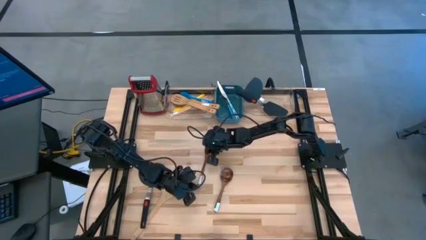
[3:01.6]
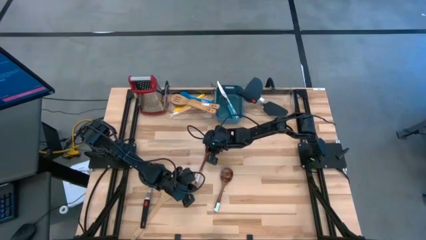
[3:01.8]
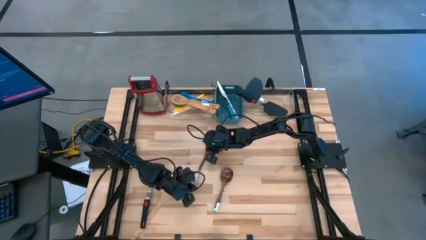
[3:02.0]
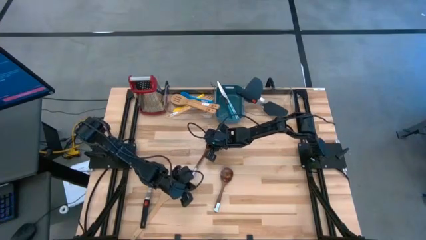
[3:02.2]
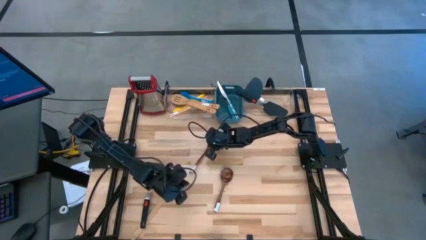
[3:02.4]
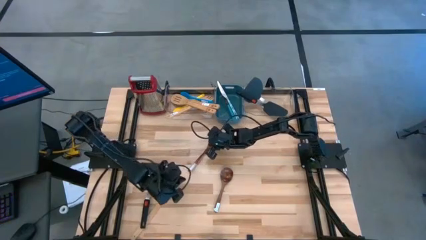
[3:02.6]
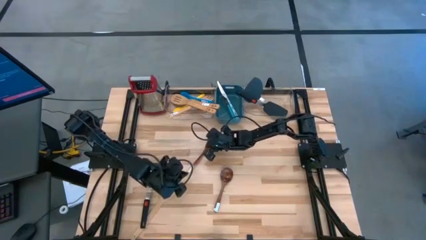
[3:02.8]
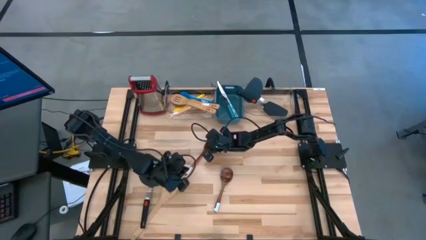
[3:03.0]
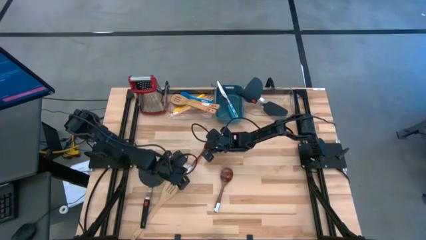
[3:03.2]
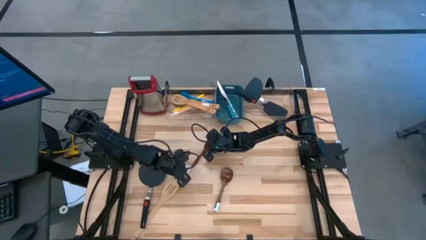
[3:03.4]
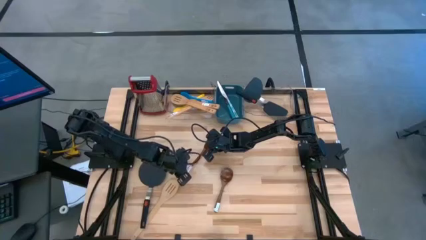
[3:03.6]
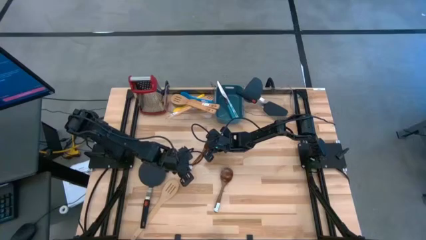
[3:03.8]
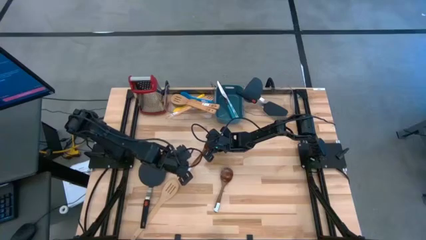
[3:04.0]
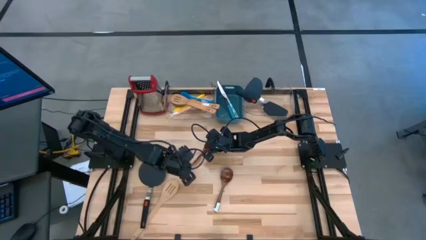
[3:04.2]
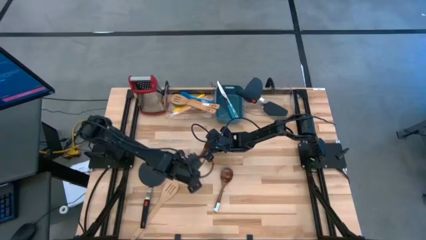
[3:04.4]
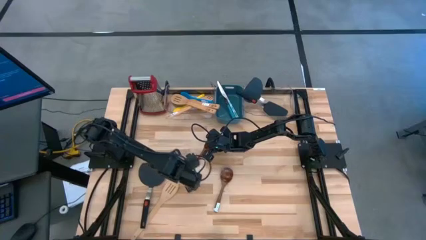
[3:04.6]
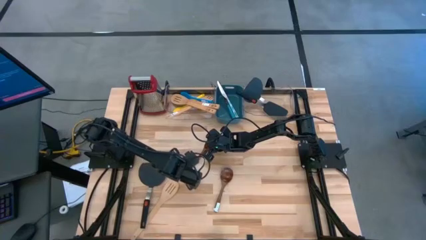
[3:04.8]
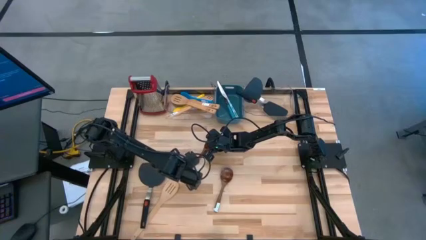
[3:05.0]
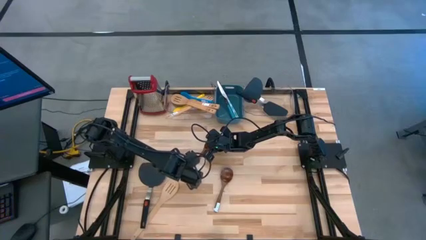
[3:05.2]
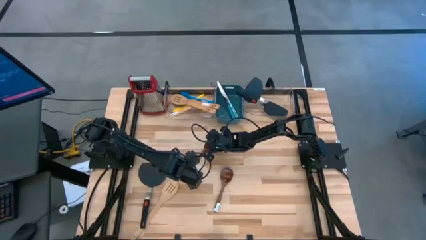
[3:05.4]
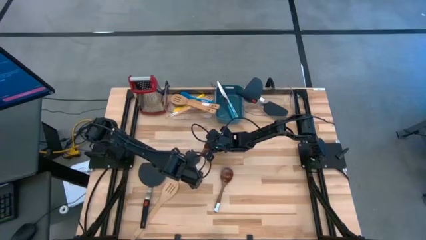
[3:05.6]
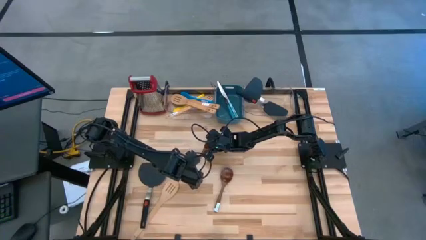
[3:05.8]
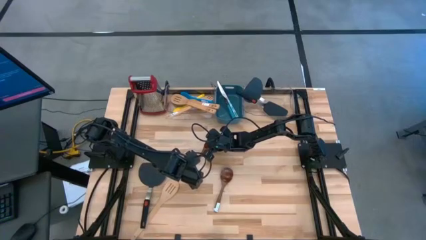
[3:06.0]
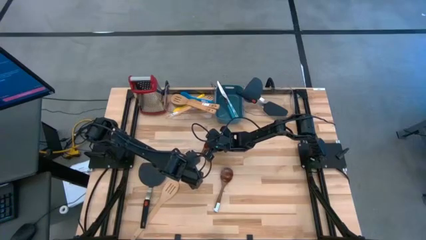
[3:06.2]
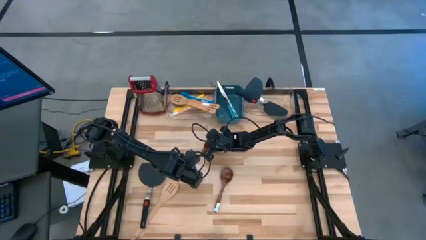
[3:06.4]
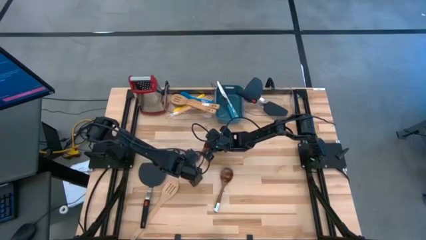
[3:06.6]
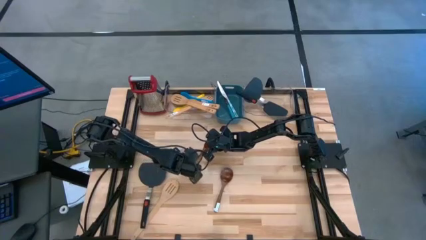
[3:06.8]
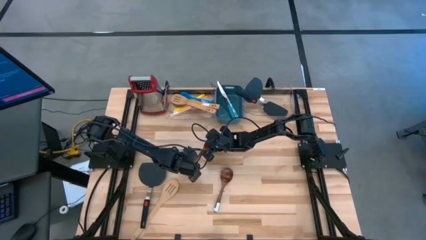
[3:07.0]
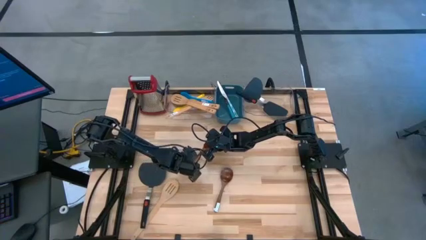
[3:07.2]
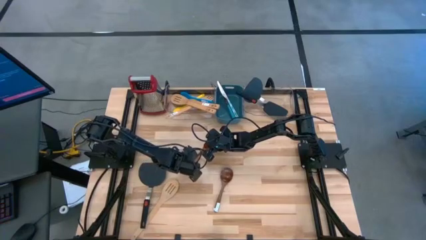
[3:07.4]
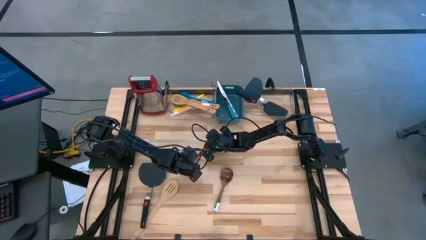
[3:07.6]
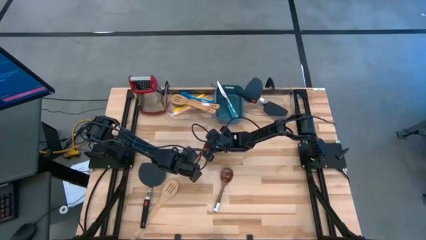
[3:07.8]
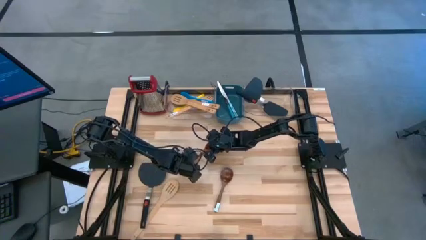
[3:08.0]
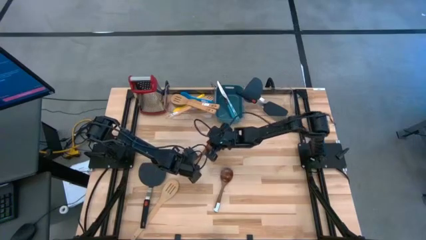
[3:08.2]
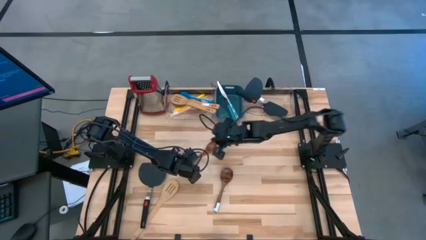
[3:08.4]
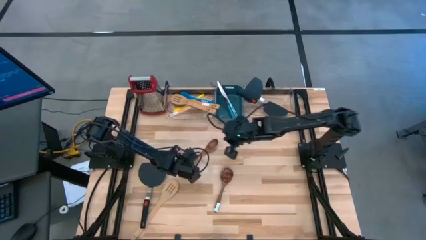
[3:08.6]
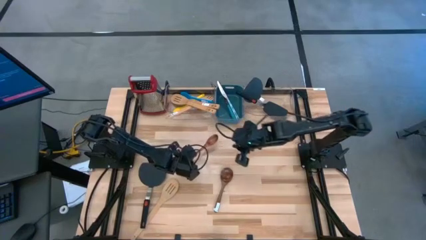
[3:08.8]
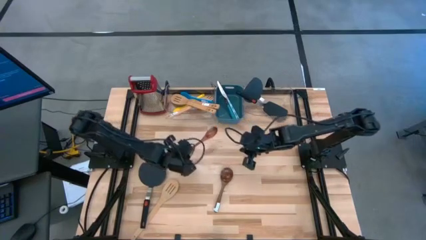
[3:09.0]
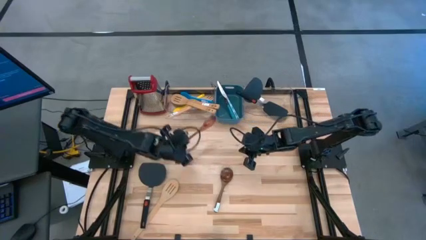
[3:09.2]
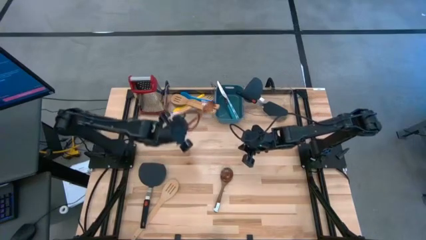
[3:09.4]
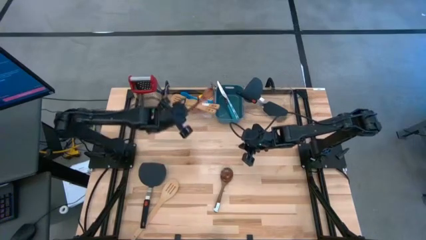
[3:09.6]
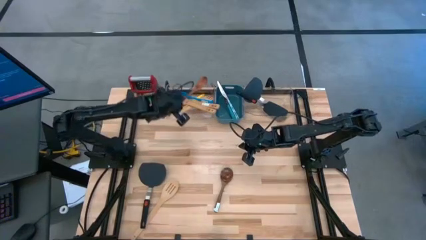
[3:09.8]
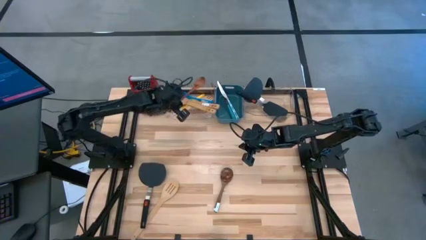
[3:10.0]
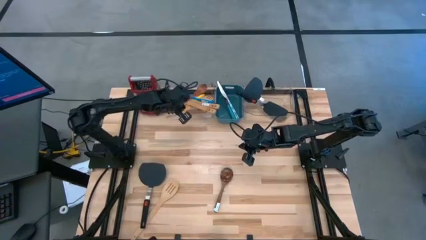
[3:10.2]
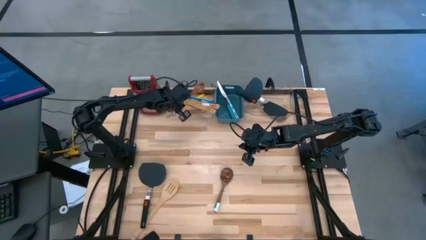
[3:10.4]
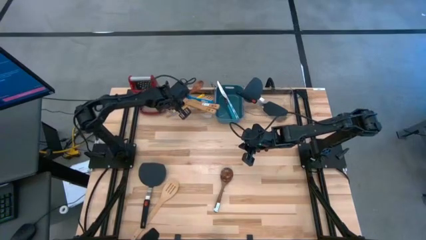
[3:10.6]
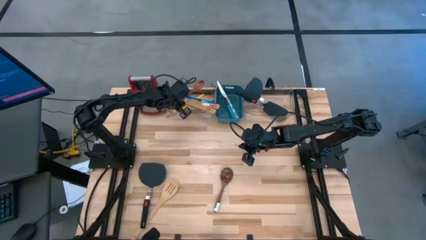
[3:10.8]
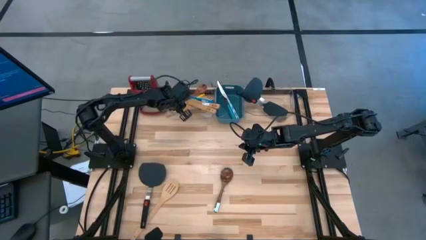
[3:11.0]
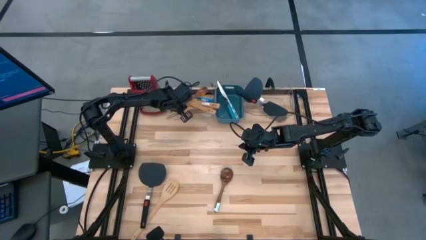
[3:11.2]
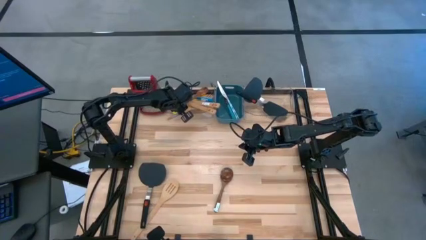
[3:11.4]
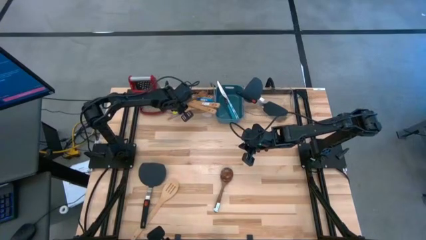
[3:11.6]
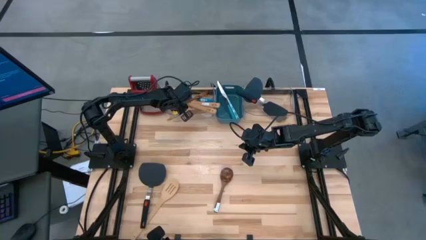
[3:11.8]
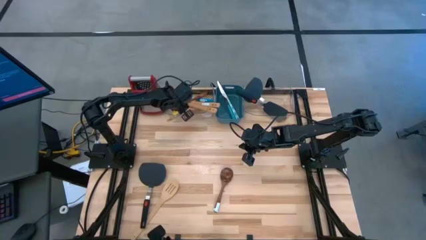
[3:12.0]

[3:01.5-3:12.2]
Task: Pick & Place Kitchen Items
Put the brown serving spoon into the left transparent bin

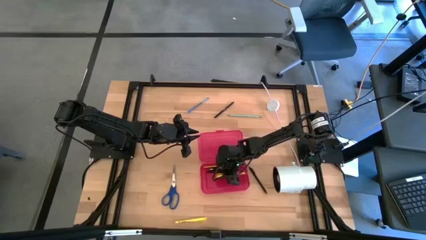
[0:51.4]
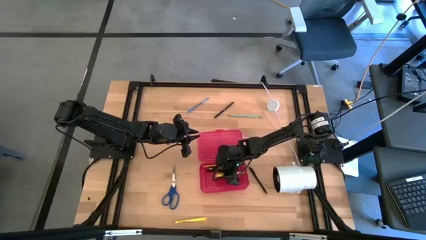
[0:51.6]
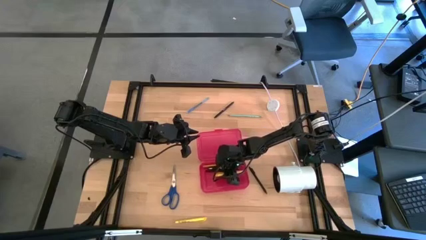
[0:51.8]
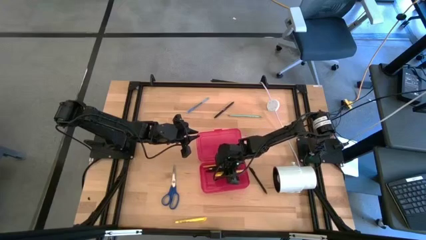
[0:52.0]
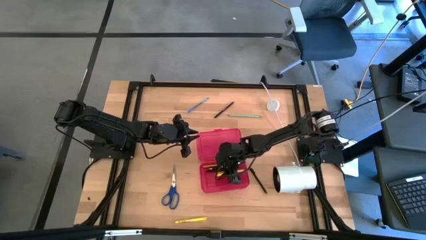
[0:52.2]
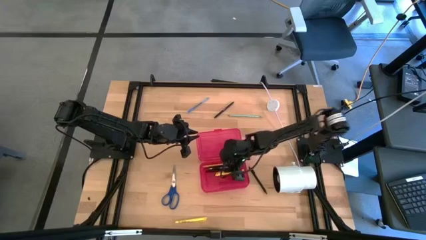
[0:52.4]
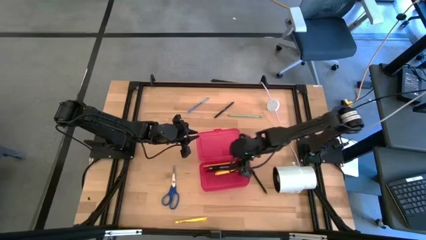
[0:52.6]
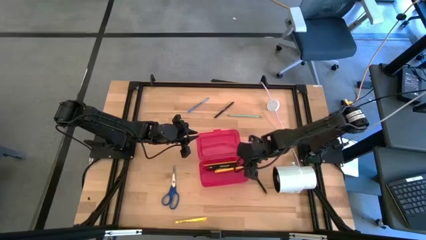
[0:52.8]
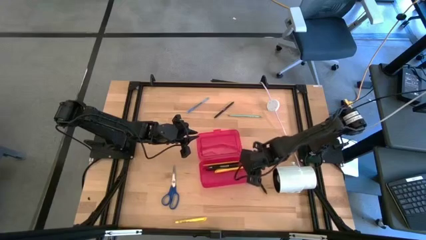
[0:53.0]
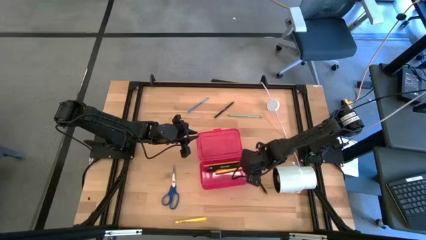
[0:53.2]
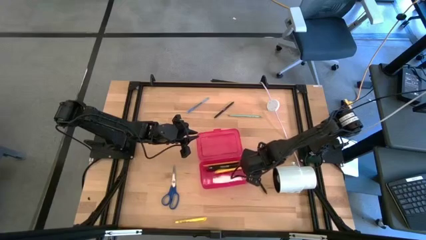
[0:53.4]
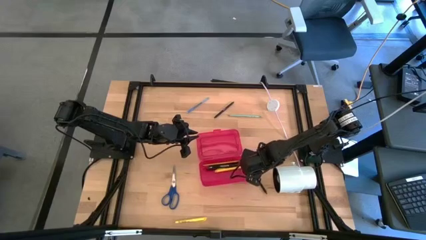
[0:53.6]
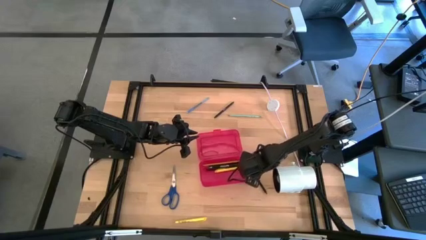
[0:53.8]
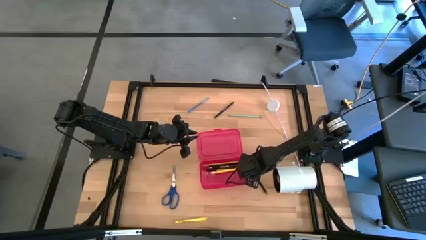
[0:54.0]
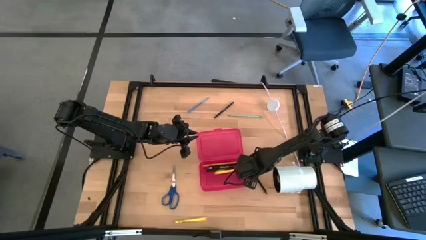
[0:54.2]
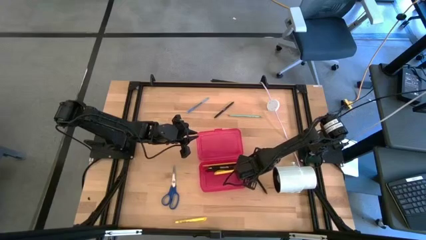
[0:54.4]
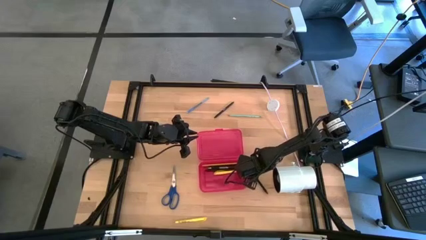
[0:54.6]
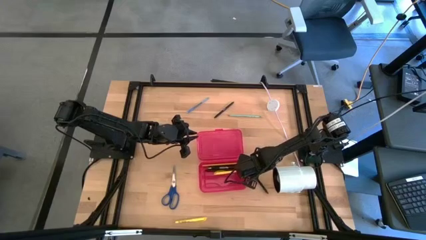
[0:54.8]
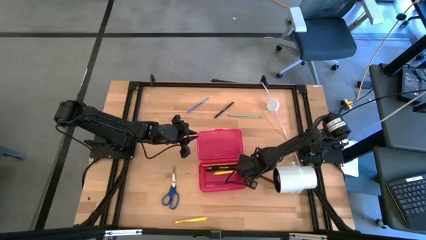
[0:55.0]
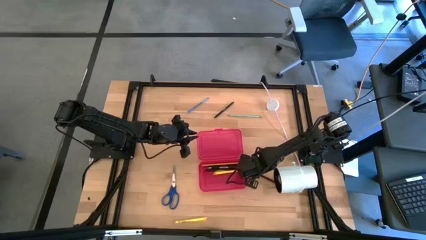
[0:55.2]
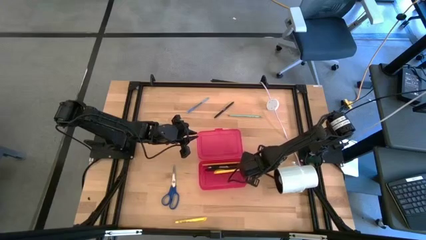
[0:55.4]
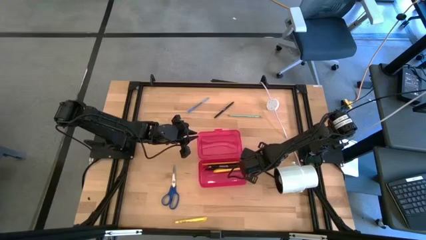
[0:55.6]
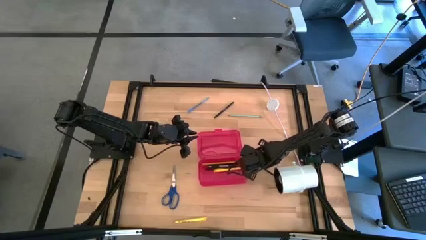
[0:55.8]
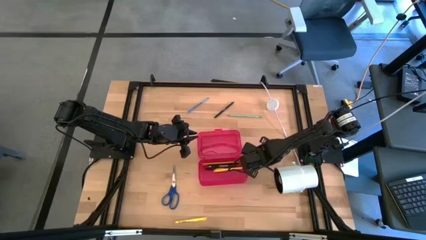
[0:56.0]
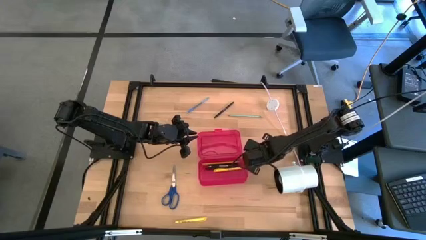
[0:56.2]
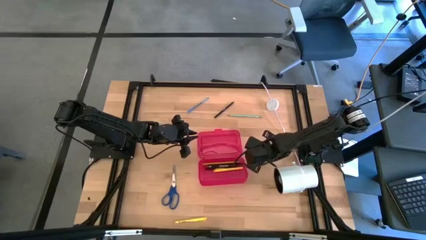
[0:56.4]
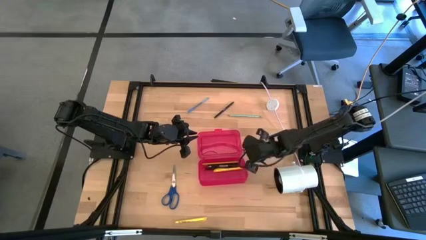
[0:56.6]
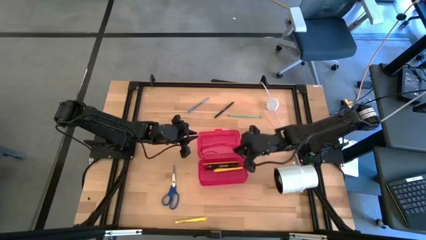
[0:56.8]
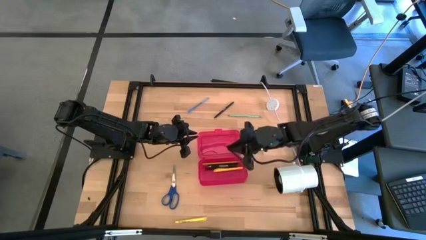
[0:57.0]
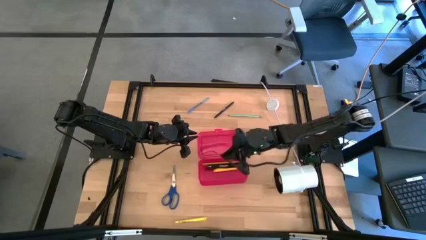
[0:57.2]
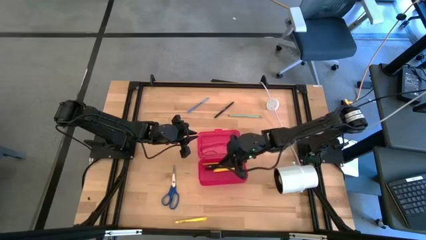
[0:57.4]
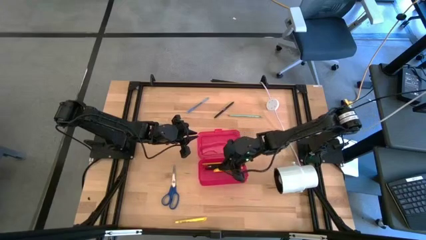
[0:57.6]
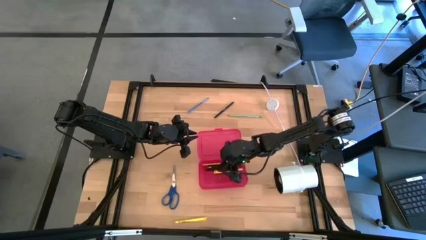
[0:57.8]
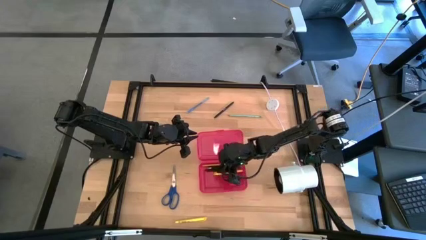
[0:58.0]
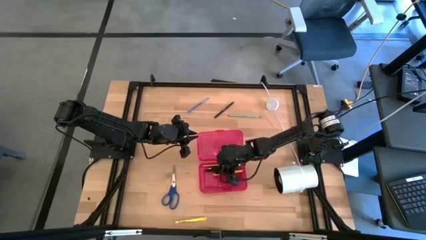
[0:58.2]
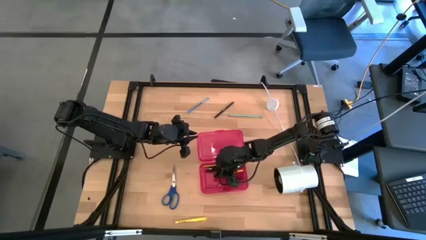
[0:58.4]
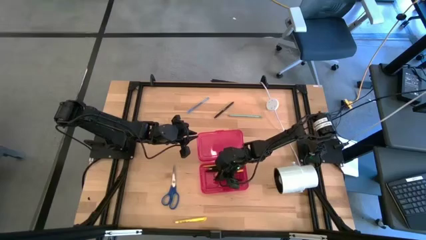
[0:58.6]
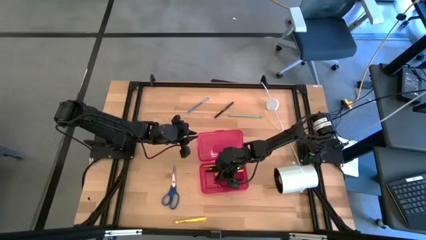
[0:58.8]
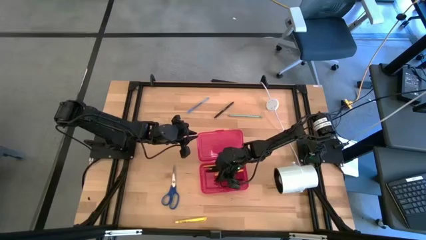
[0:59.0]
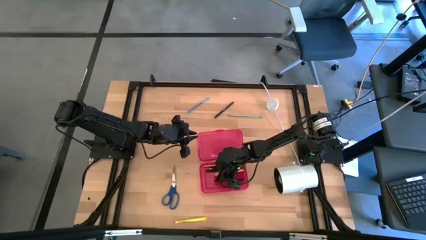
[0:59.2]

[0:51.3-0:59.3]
Task: Pick & place school supplies into a supply box
Put the bottom black pen into the red supply box
